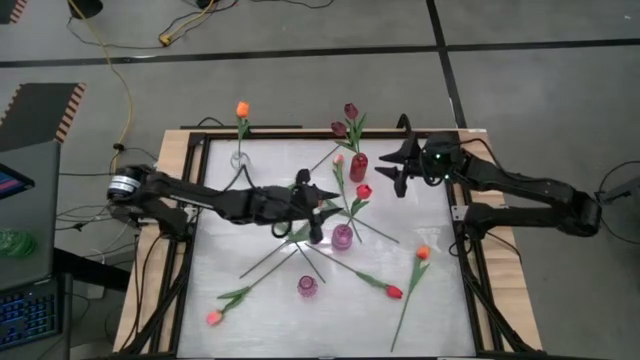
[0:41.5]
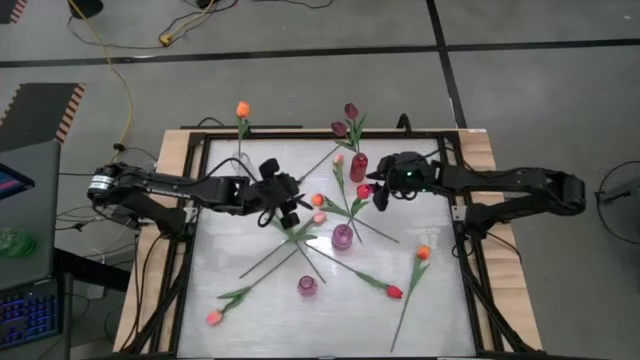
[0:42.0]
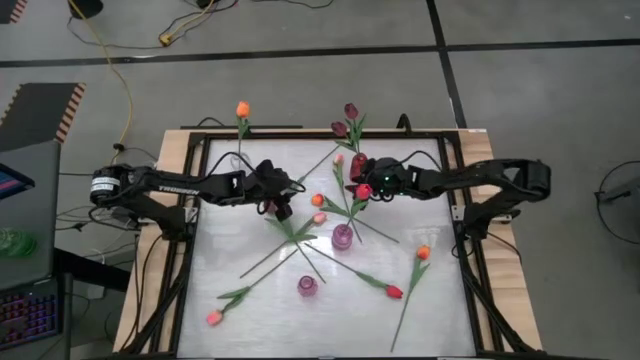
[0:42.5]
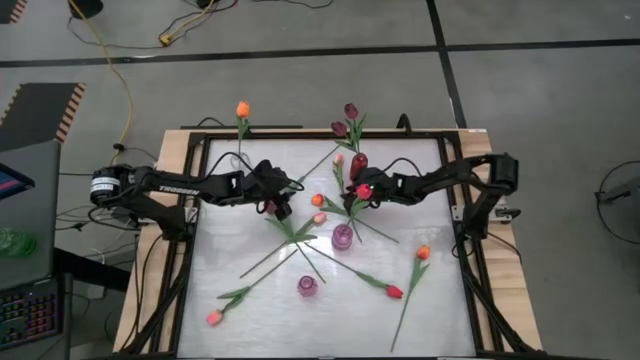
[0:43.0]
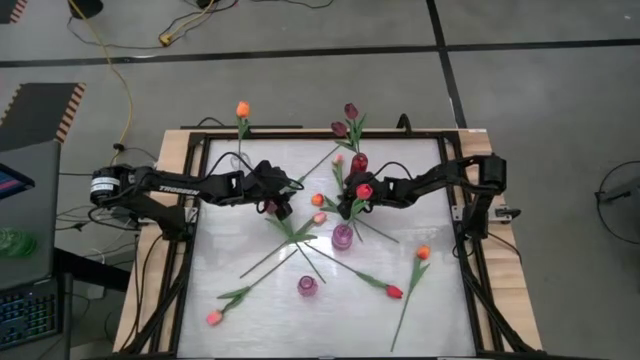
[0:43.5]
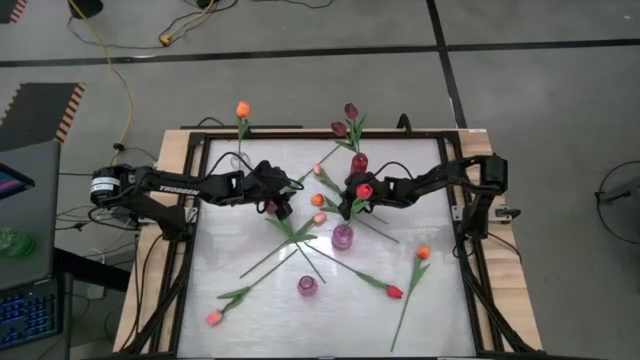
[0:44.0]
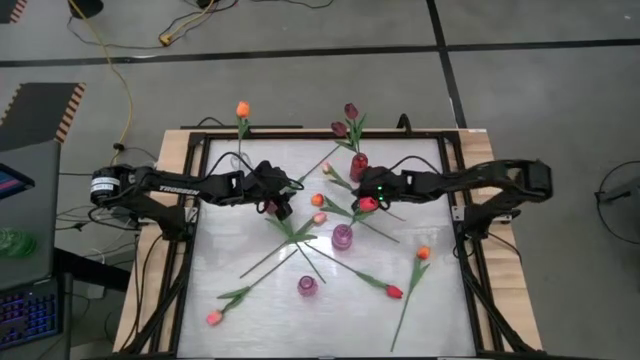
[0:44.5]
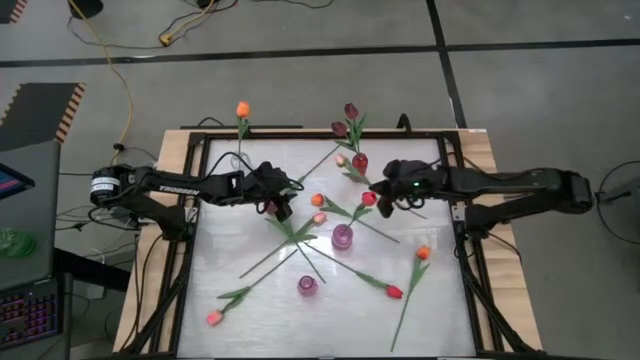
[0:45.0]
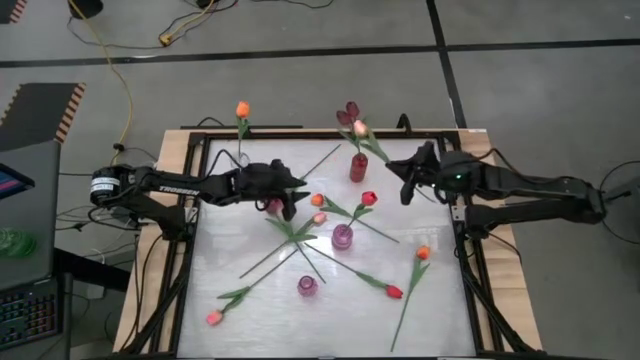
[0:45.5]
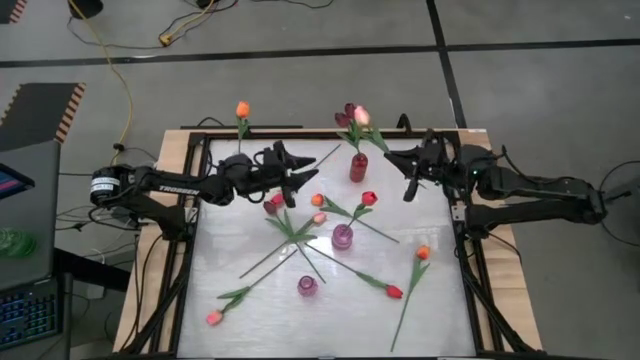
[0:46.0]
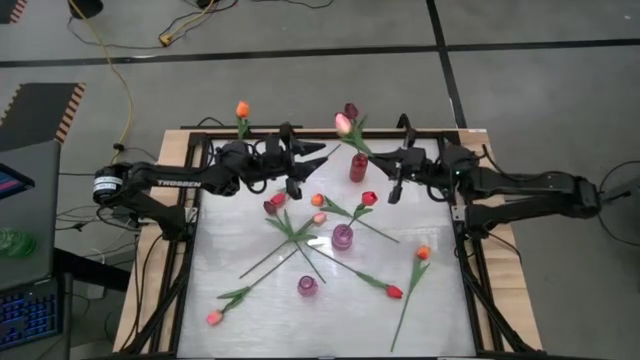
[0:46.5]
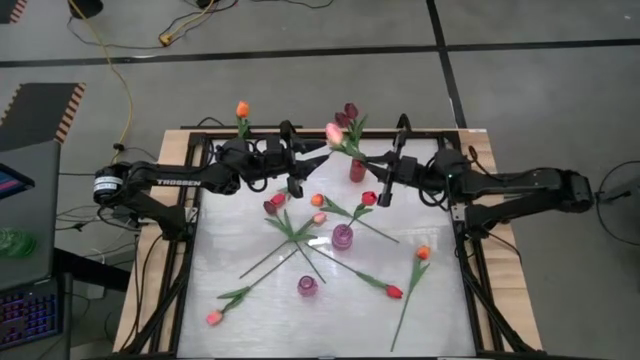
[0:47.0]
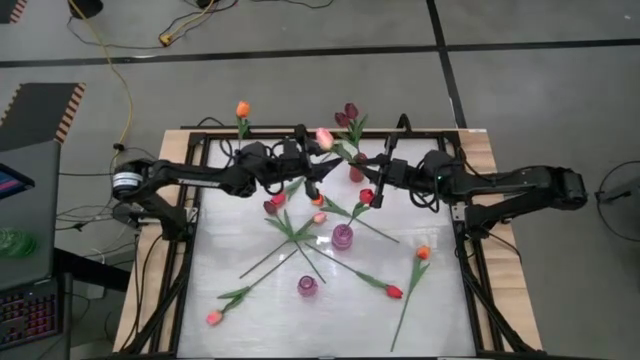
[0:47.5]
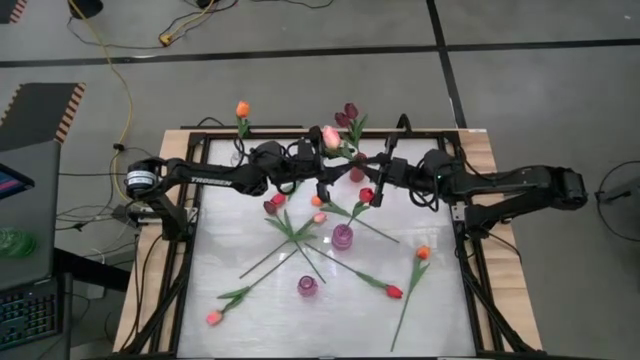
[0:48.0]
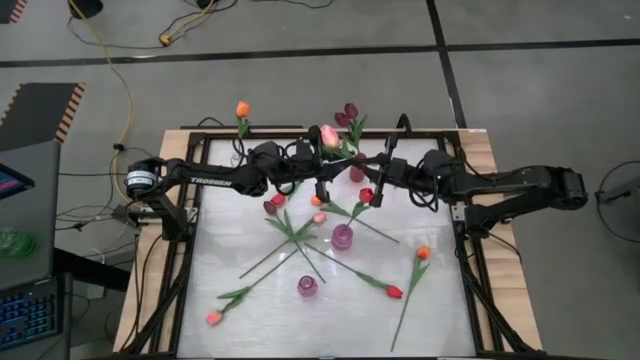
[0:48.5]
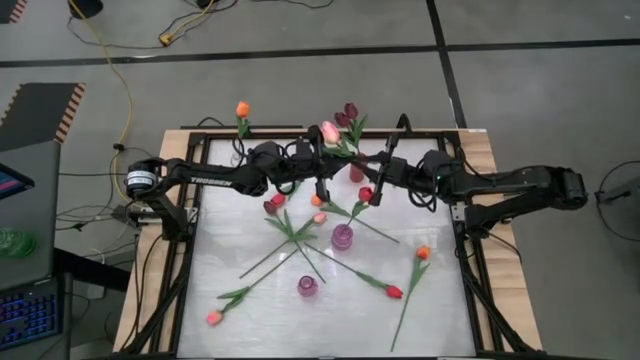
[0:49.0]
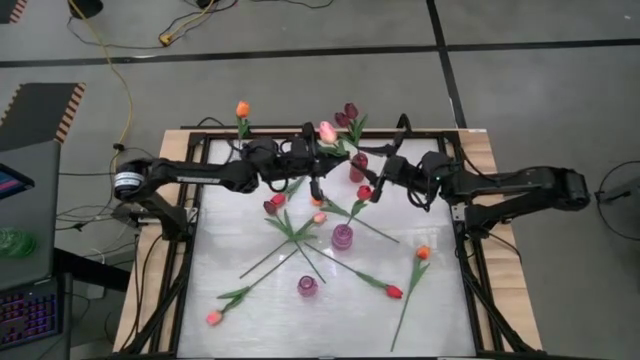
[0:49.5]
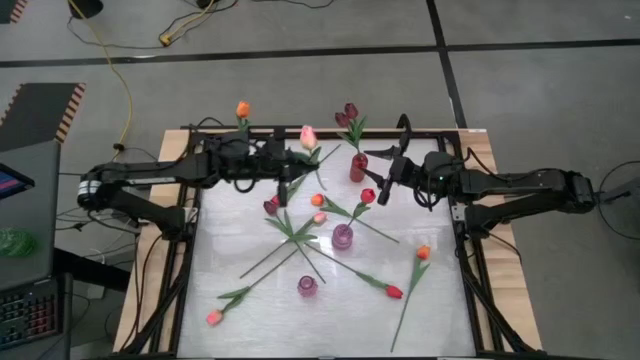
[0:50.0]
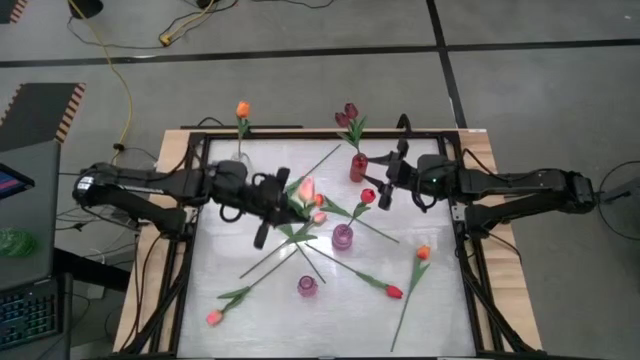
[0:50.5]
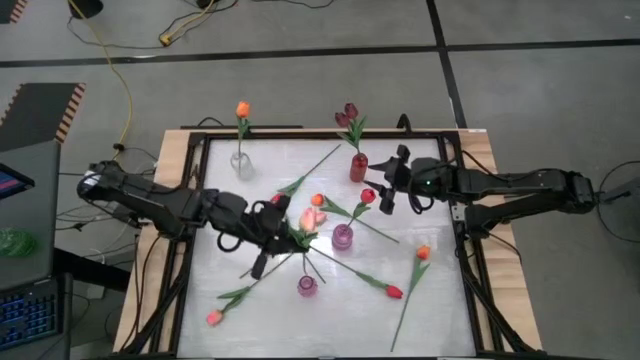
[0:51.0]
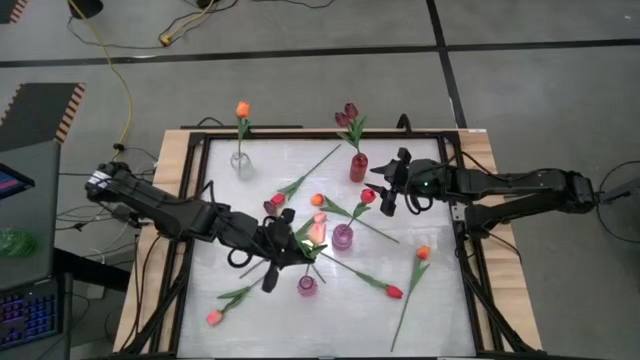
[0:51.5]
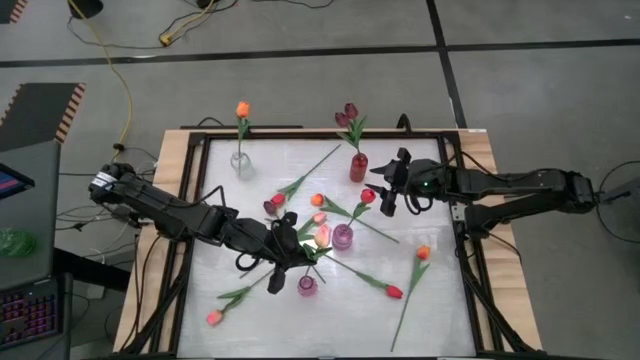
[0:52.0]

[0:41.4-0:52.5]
Task: Sort flowers into vase by color
Put the top right pink flower into the bottom purple vase

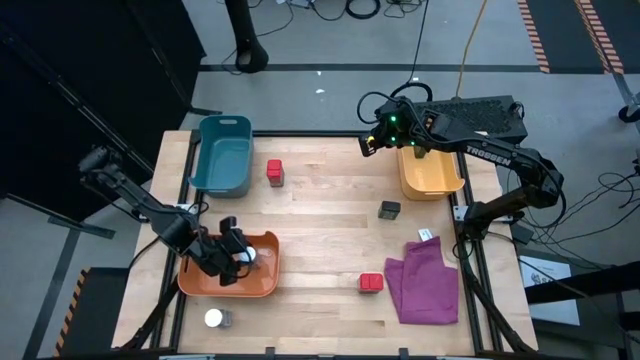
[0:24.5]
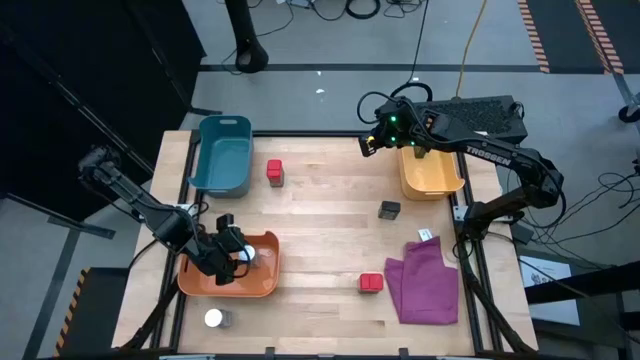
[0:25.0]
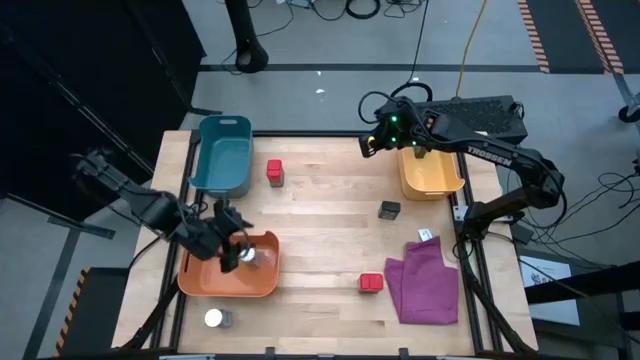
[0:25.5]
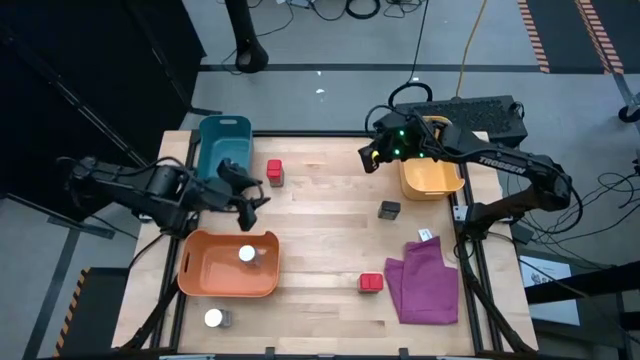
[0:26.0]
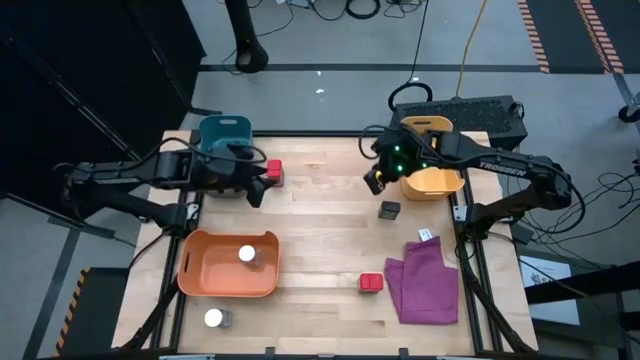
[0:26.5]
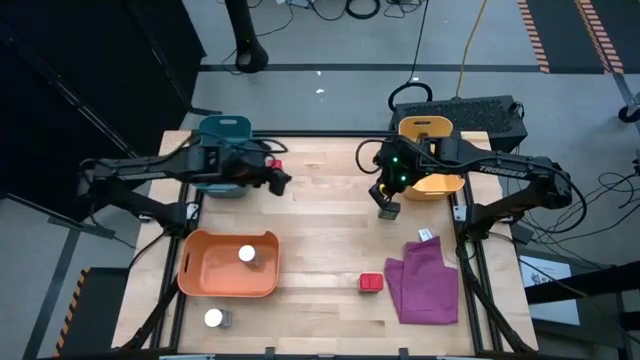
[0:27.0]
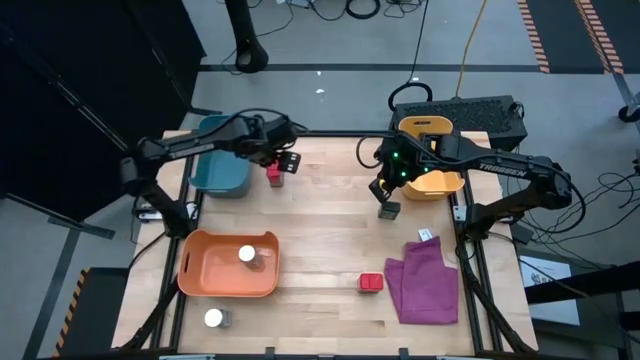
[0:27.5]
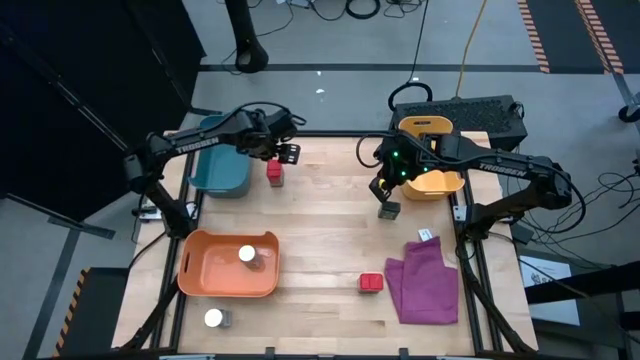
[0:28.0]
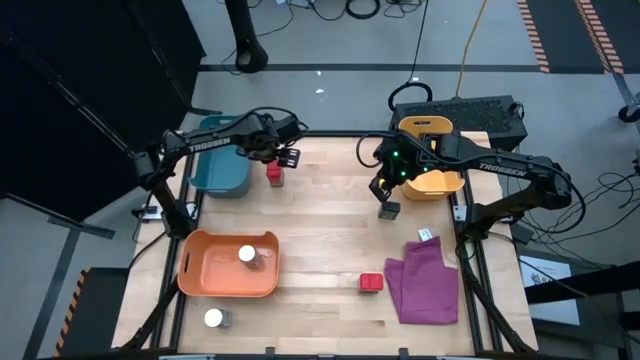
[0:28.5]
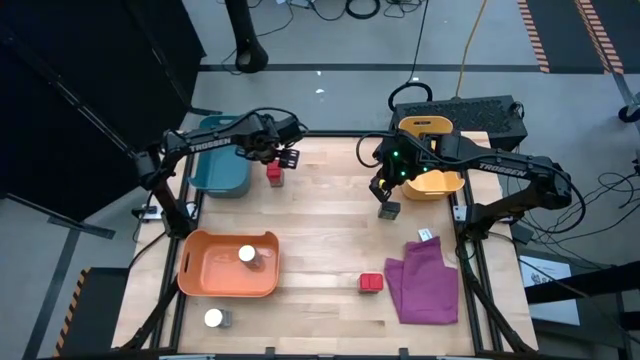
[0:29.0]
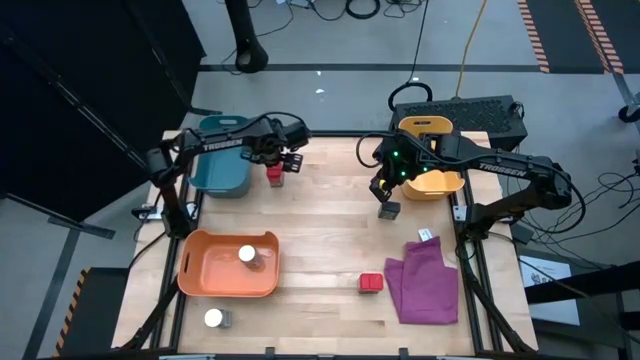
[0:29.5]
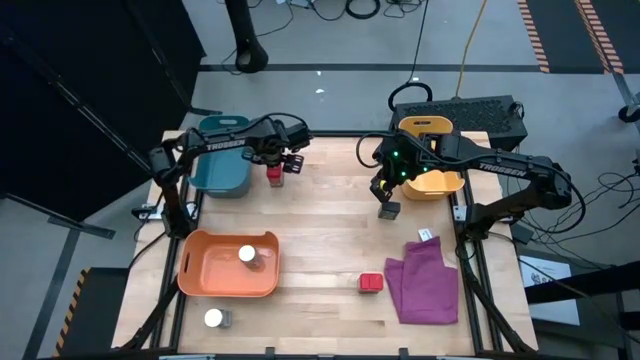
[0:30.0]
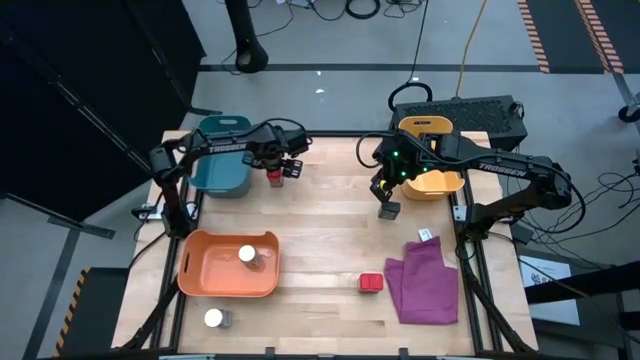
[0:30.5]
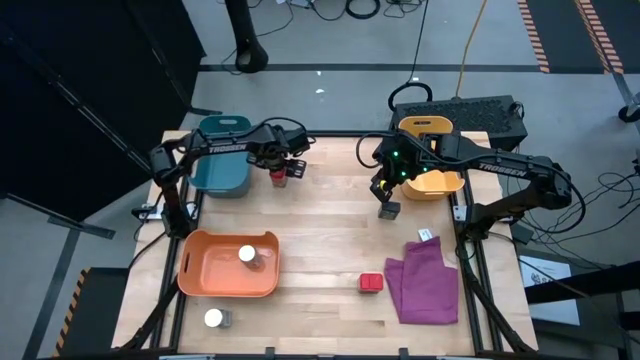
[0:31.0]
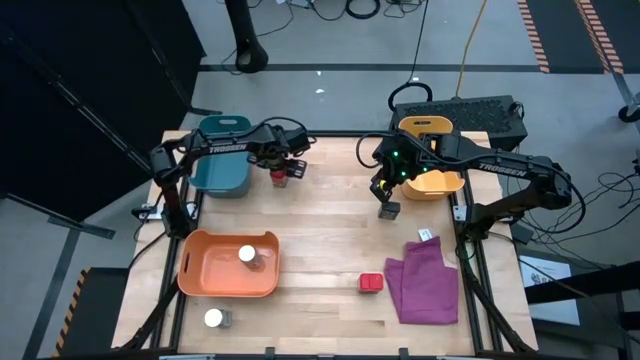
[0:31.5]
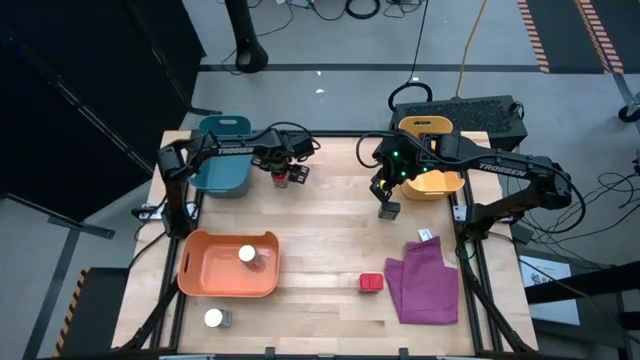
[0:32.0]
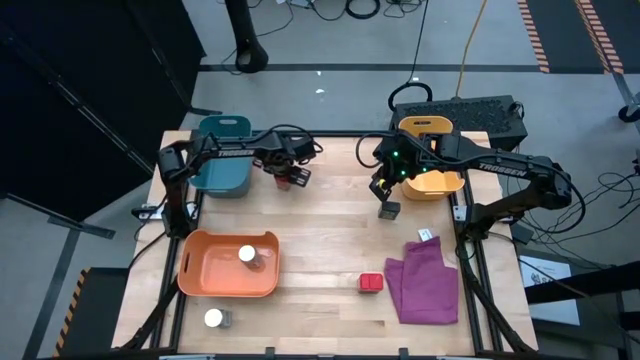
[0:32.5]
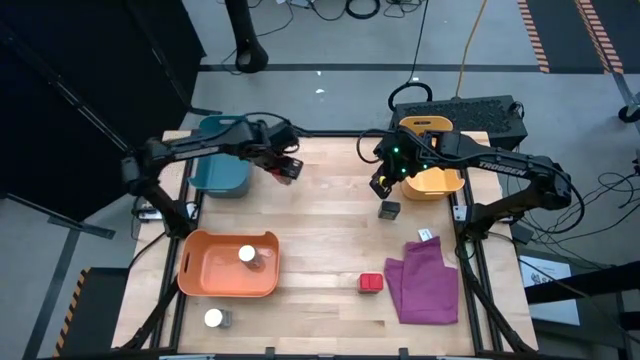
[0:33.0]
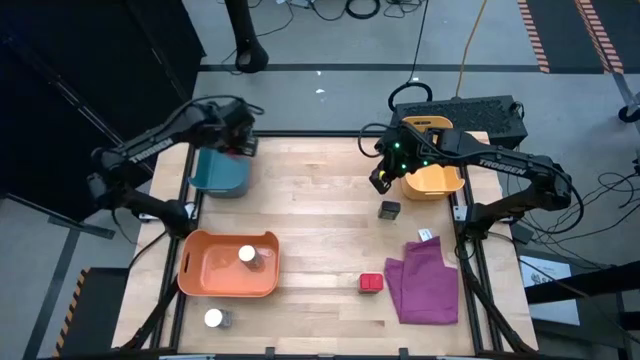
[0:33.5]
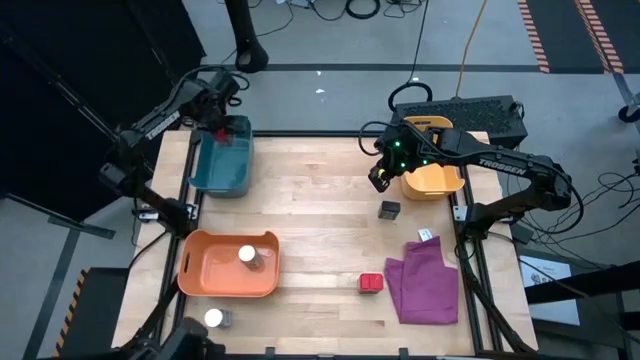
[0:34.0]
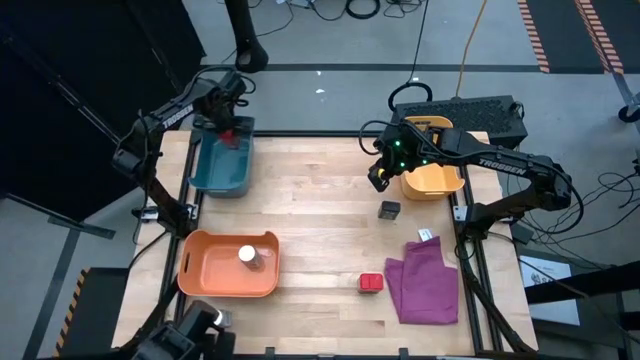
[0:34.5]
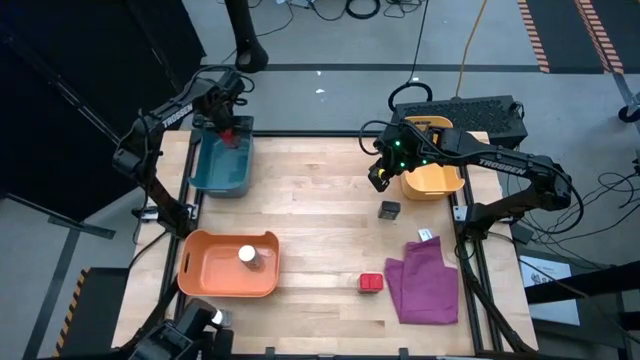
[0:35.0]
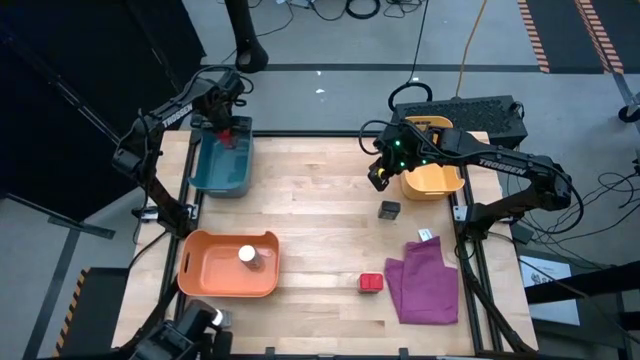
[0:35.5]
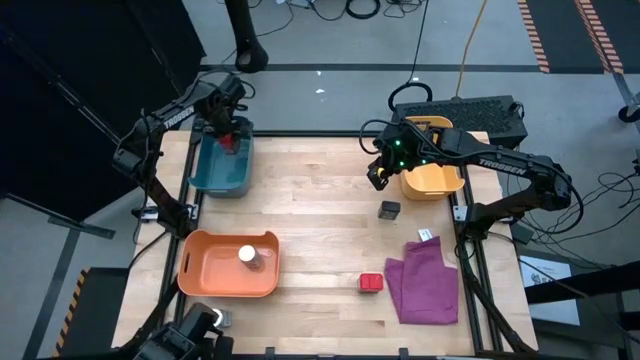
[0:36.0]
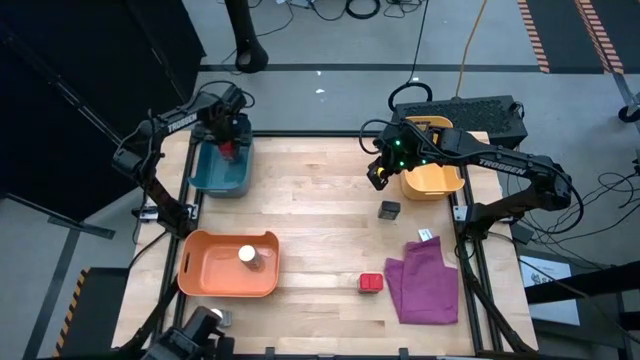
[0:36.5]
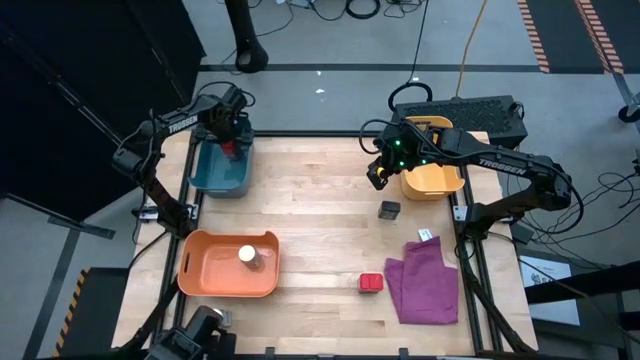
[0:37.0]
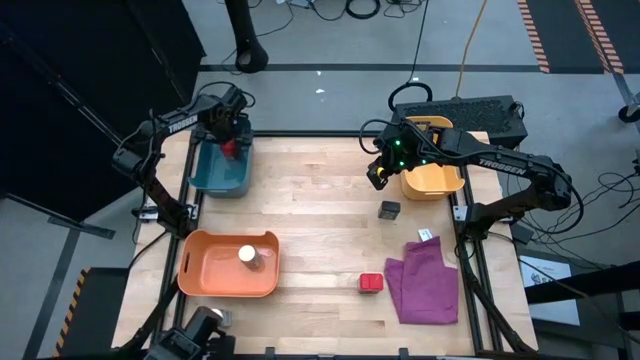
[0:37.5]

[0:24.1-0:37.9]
Task: Sort spices by type
Put the top red seasoning can into the blue bin
